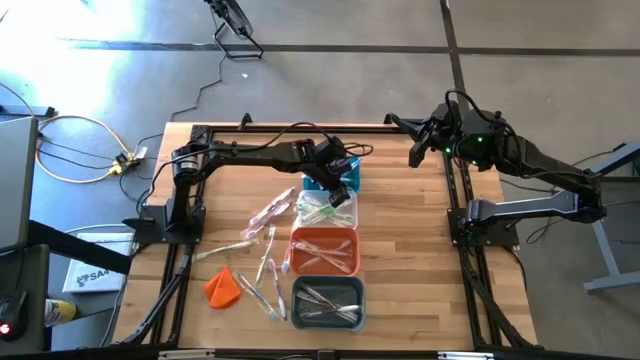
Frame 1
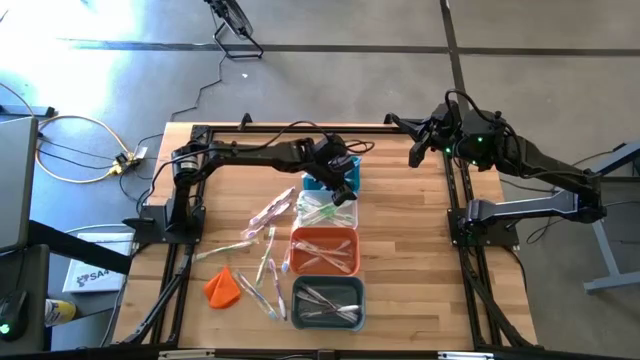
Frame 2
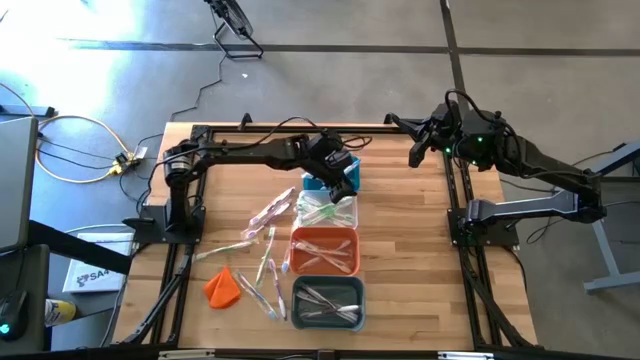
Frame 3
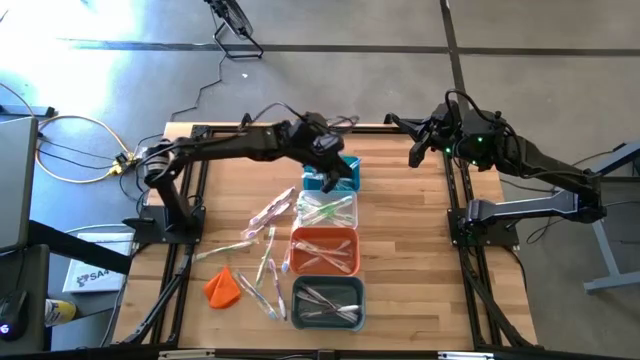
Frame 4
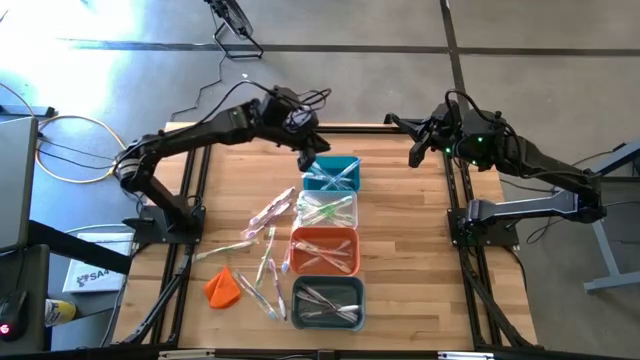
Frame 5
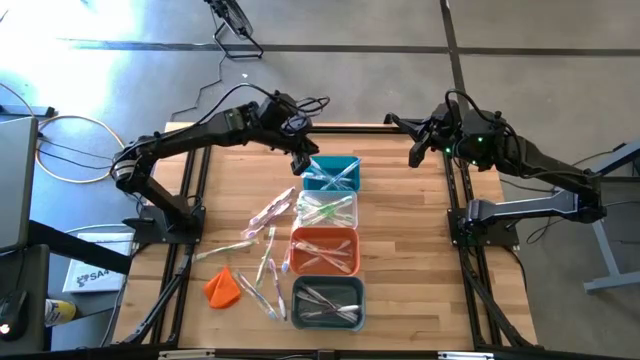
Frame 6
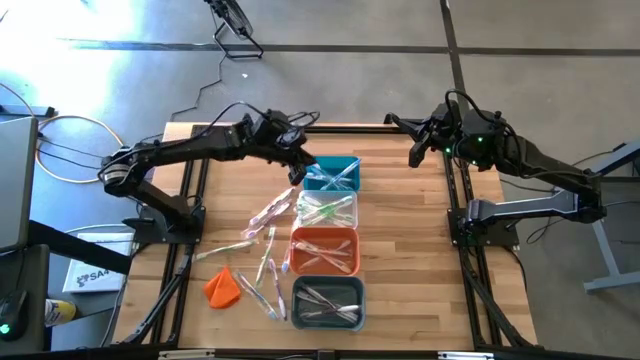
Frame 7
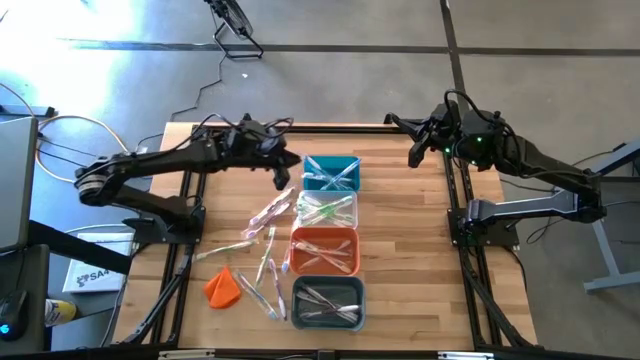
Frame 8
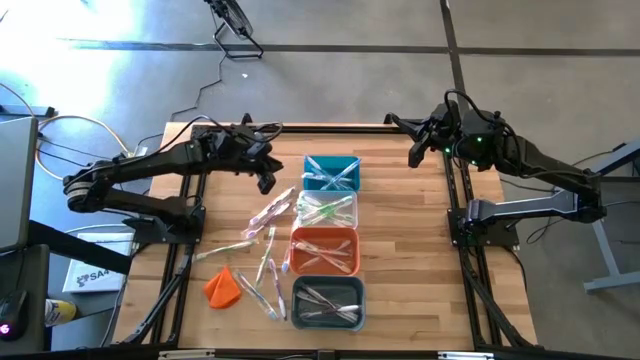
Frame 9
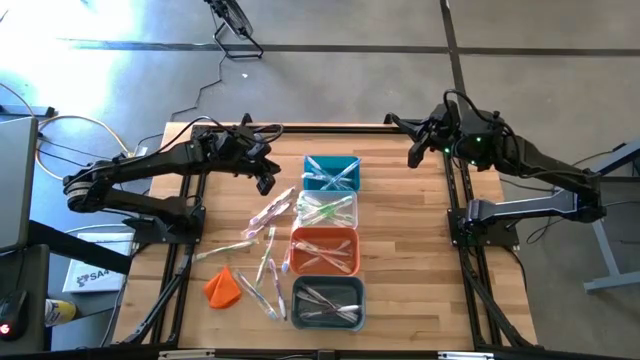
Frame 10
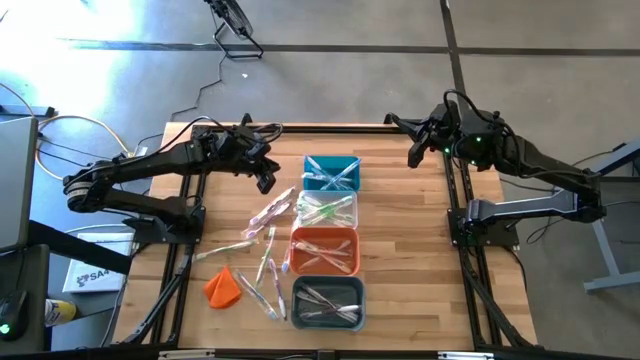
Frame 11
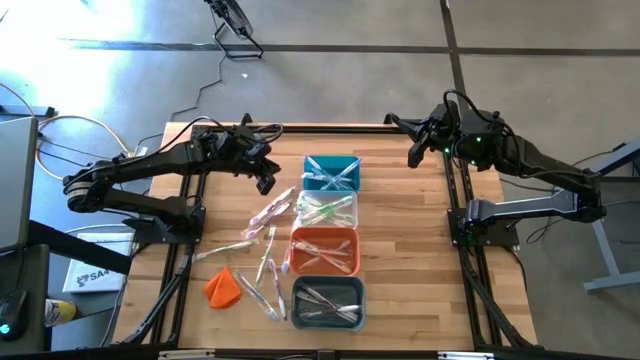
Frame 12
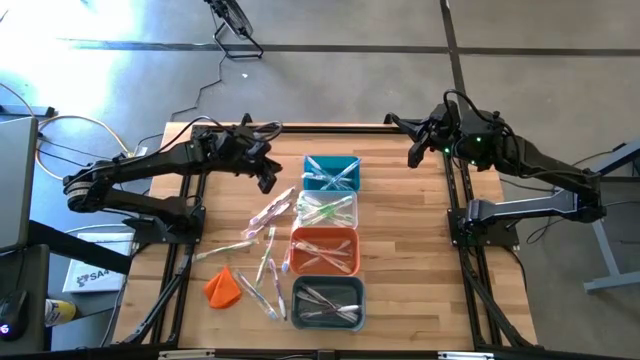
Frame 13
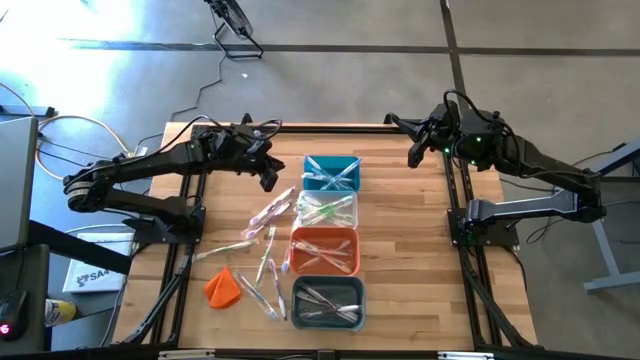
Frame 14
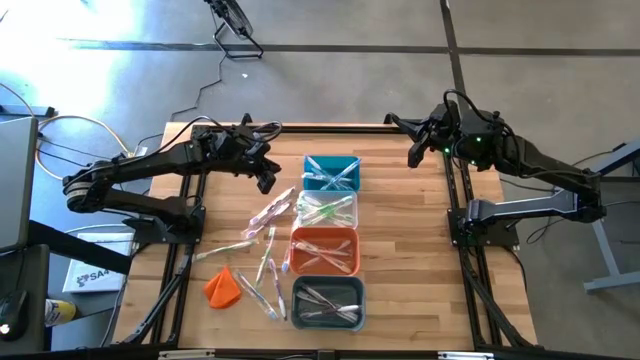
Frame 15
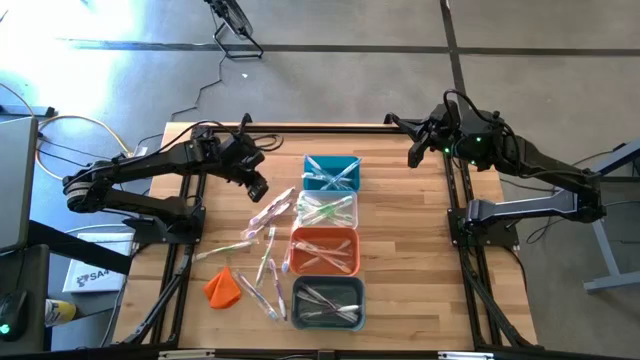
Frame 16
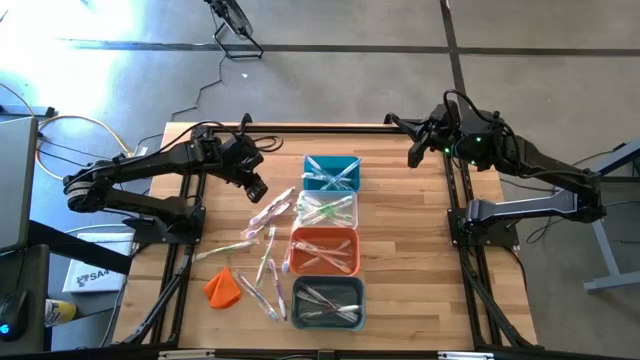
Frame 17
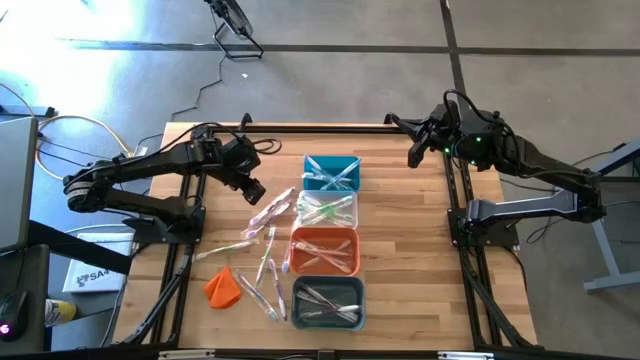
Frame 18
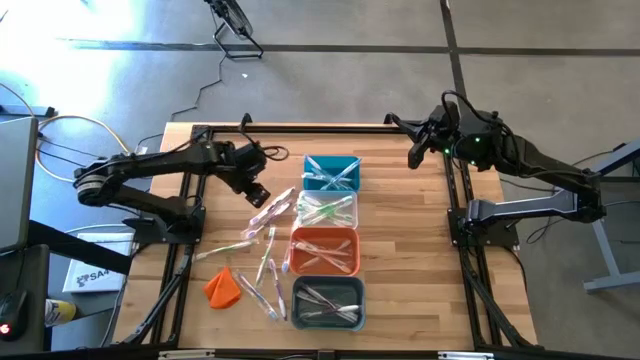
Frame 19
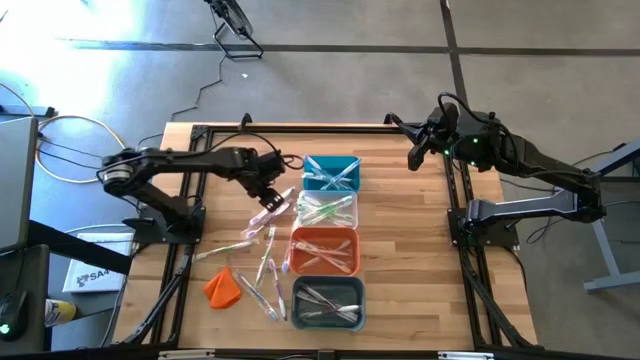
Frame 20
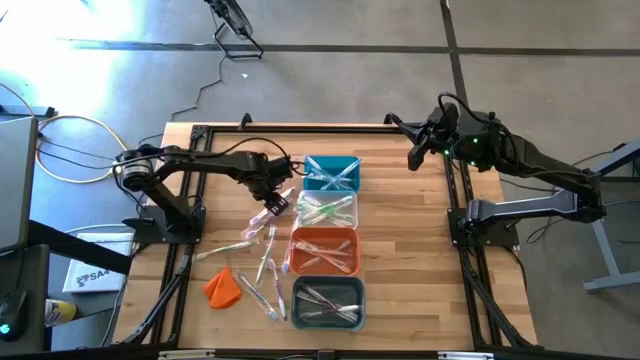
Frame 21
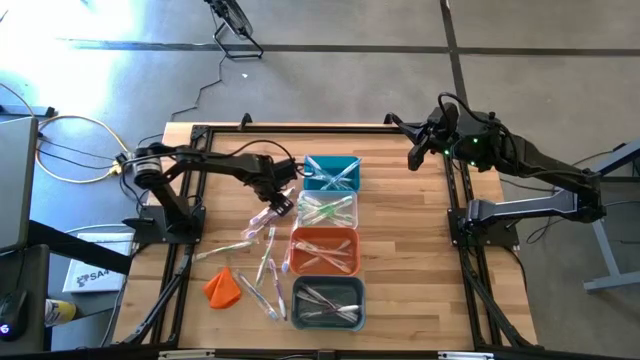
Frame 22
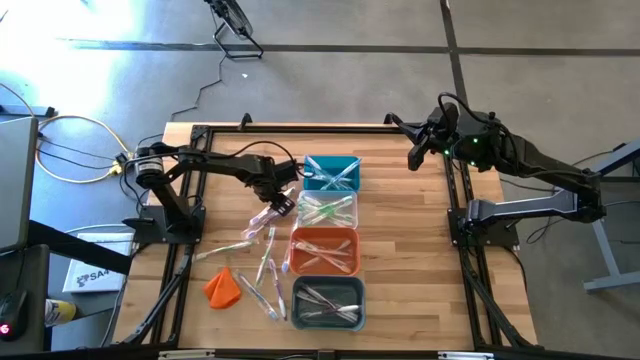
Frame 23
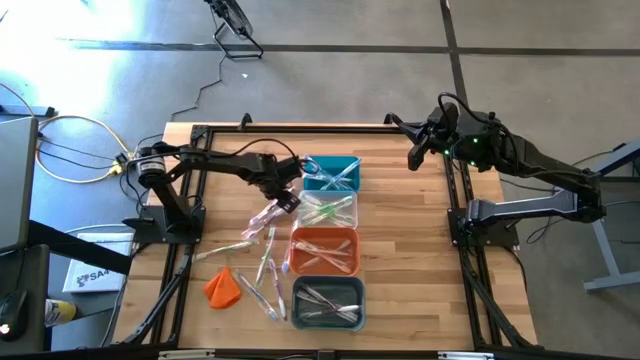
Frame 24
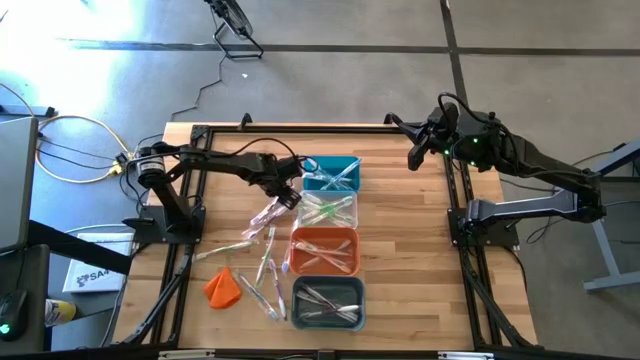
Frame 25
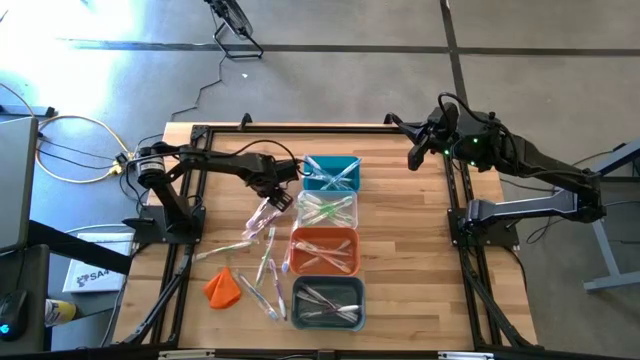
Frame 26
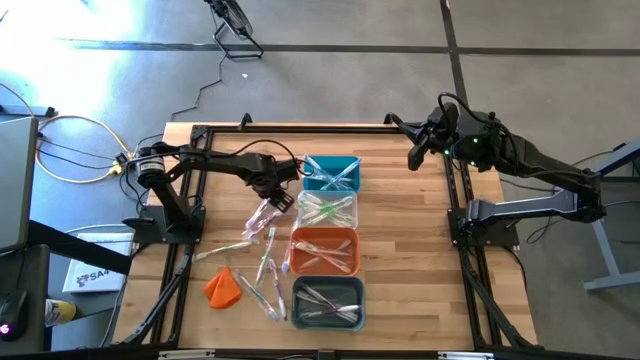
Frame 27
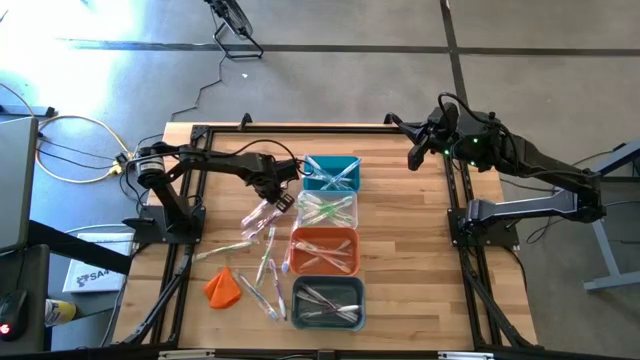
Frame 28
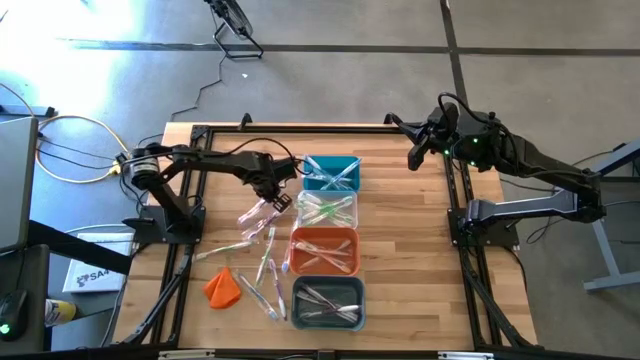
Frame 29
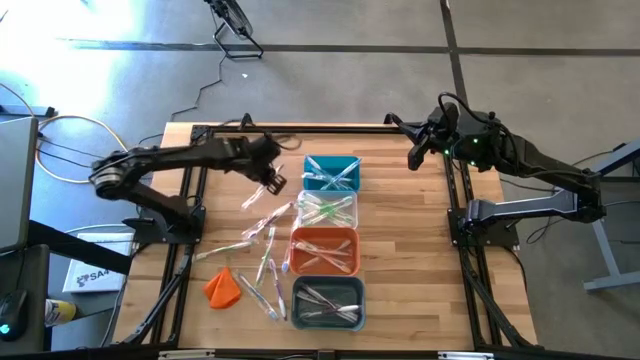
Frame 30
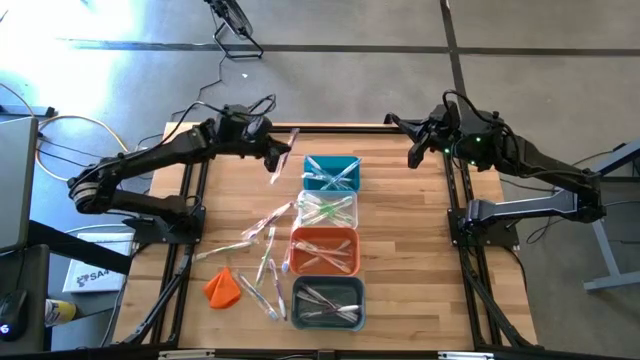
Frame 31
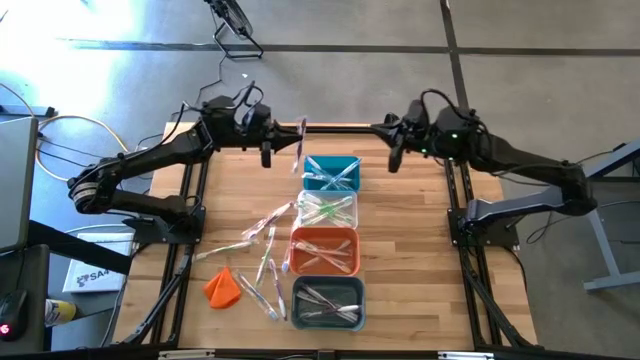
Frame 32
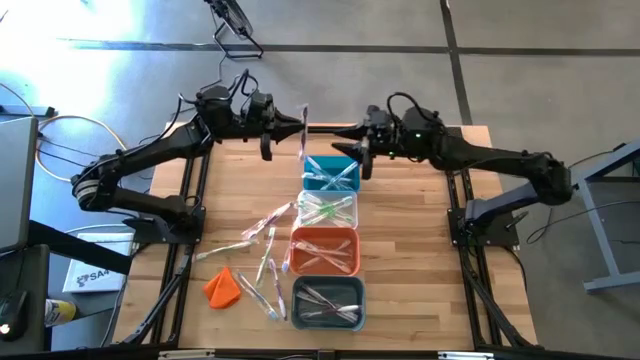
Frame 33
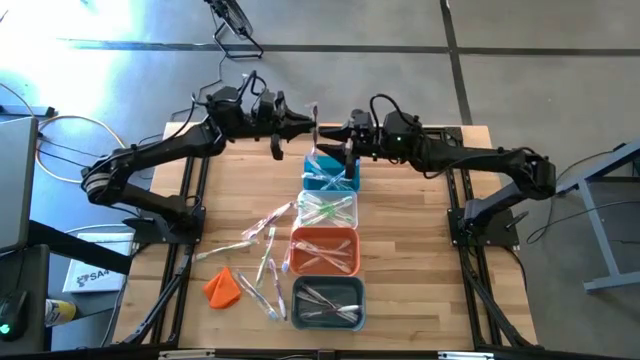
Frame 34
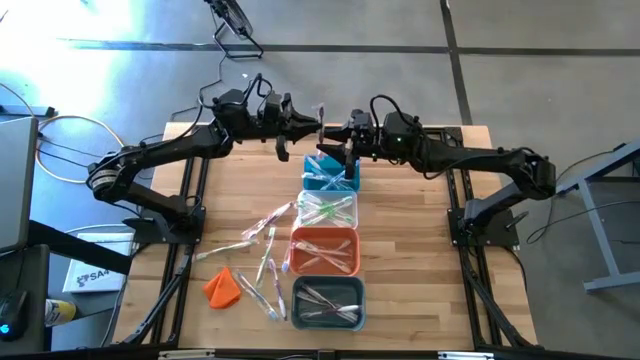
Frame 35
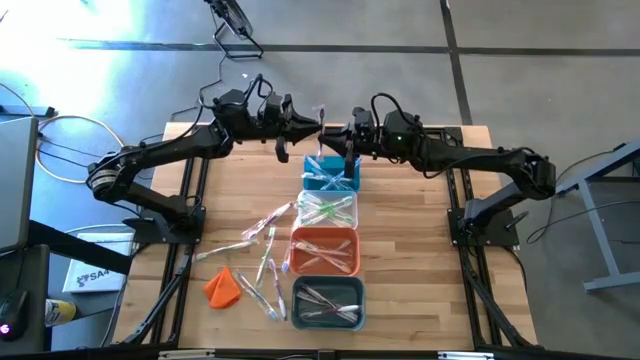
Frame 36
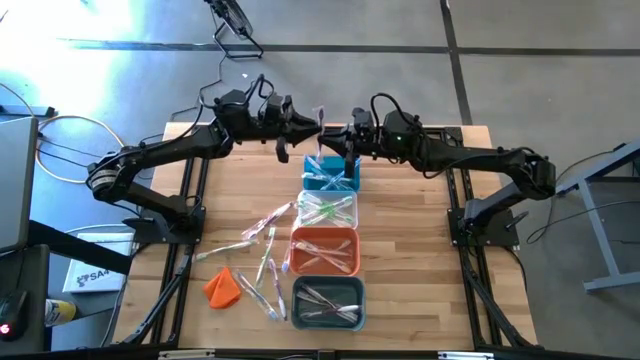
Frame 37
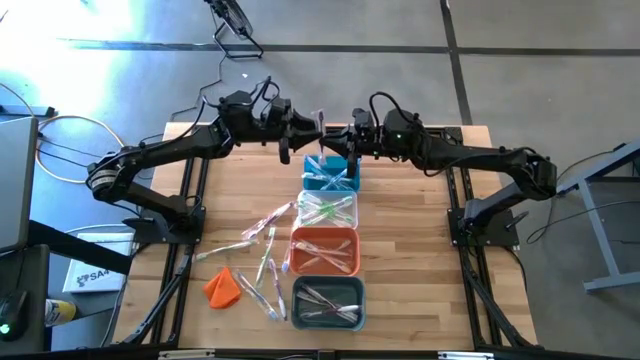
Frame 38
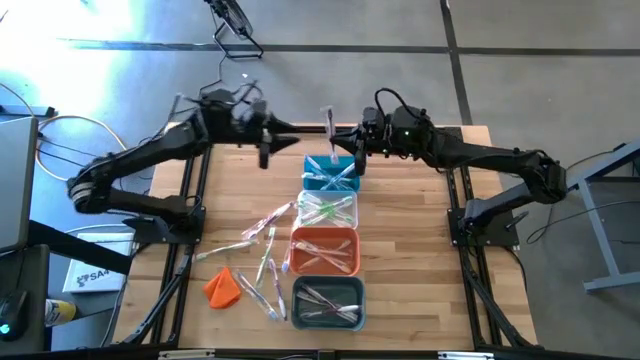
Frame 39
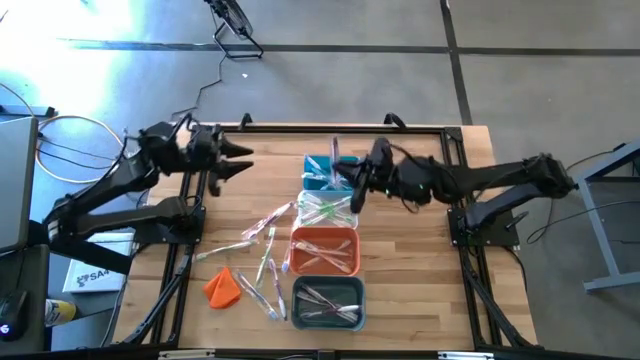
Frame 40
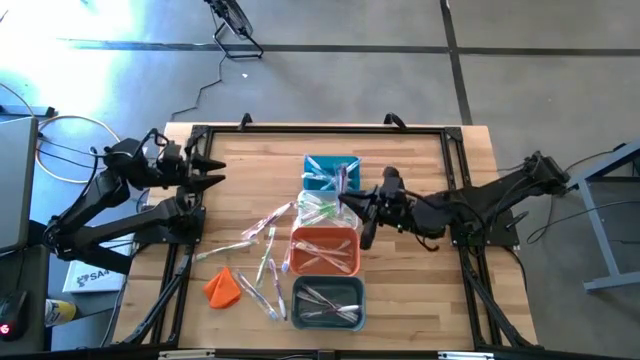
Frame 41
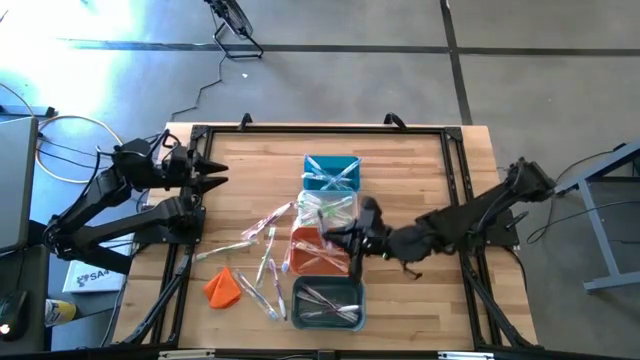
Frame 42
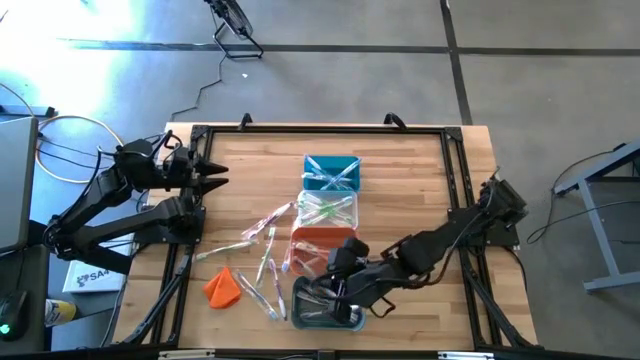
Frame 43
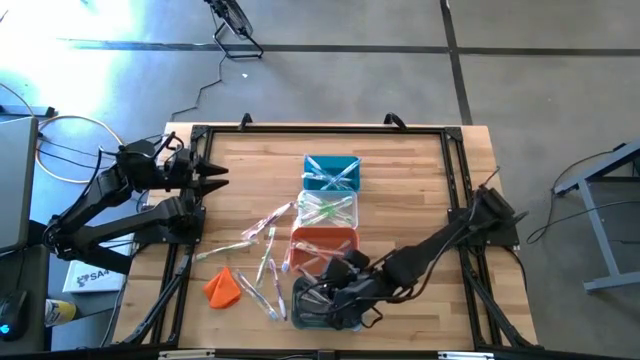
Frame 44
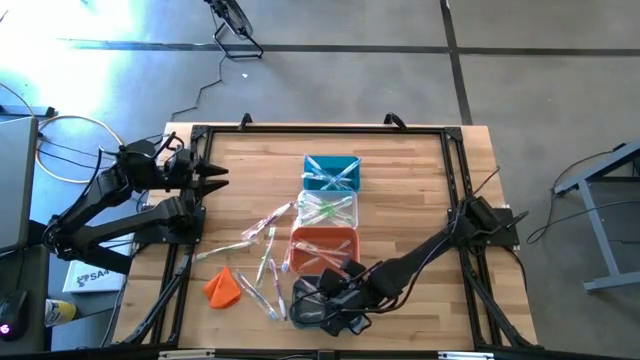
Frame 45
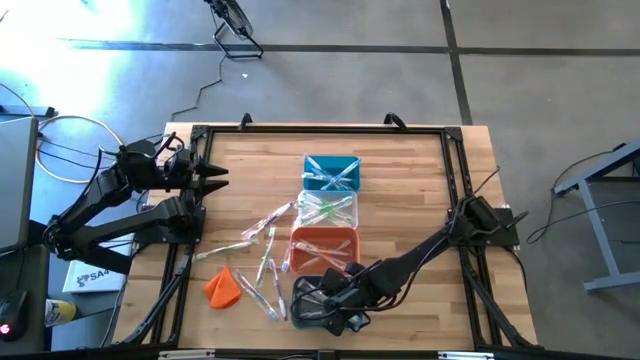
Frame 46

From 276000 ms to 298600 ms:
Task: Pick & Place Toothbrushes
Put the violet toothbrush into the green bin
